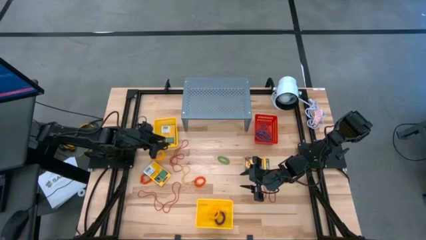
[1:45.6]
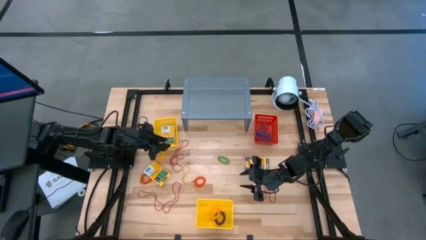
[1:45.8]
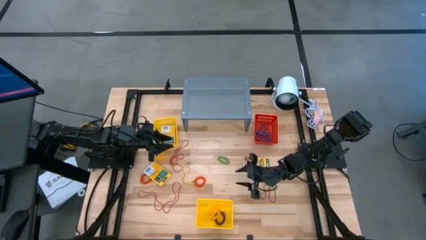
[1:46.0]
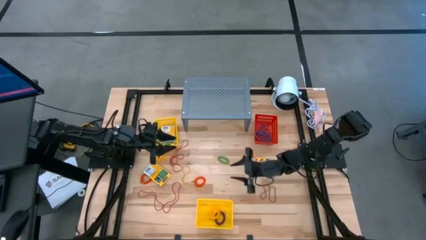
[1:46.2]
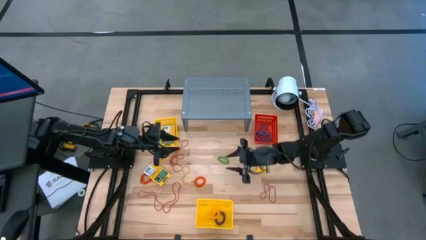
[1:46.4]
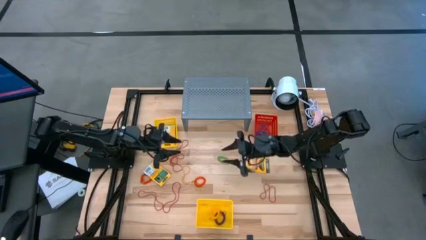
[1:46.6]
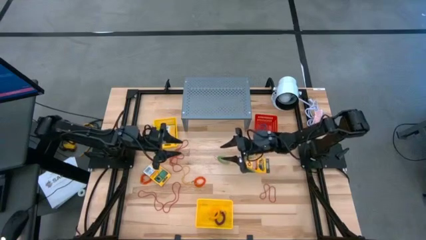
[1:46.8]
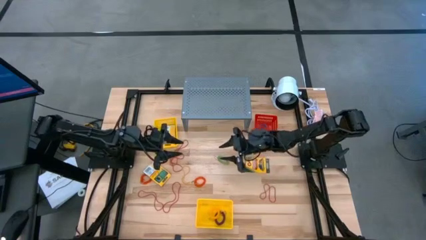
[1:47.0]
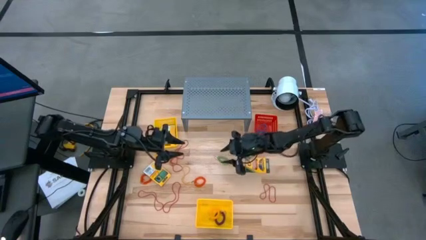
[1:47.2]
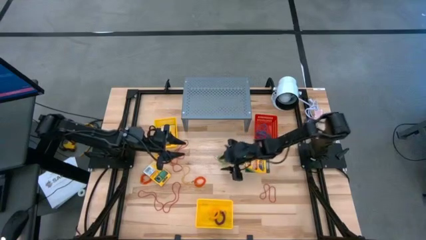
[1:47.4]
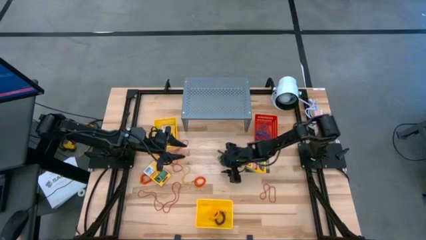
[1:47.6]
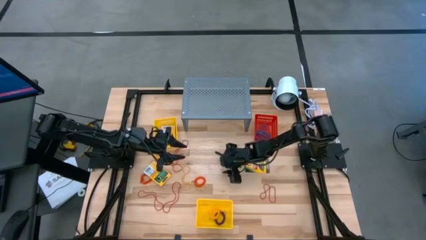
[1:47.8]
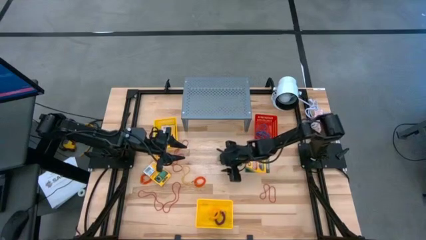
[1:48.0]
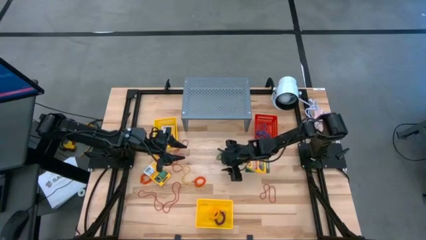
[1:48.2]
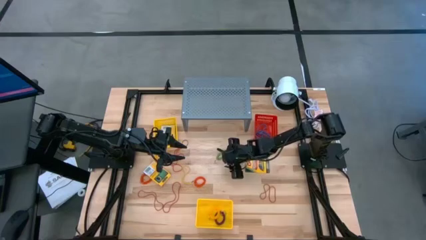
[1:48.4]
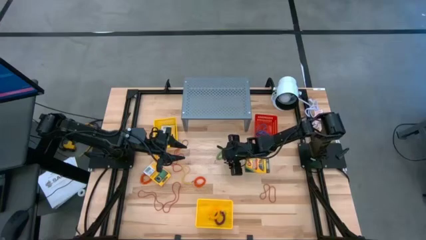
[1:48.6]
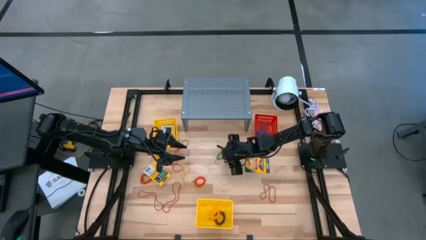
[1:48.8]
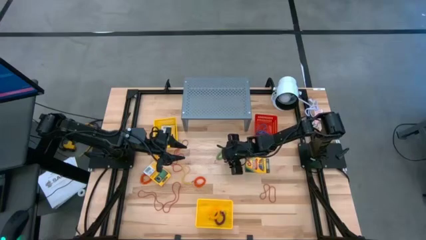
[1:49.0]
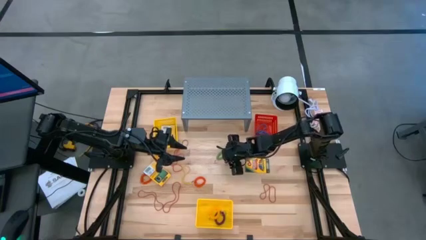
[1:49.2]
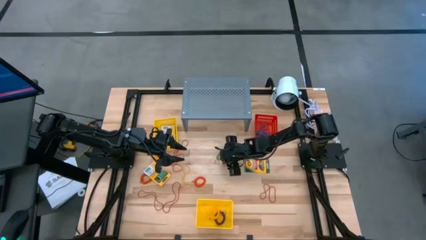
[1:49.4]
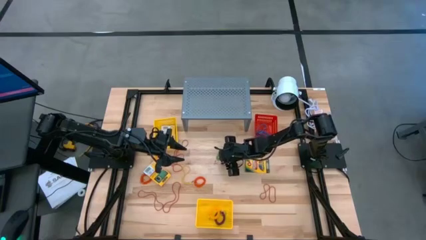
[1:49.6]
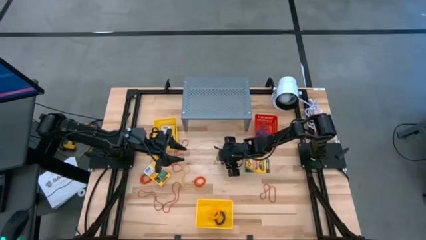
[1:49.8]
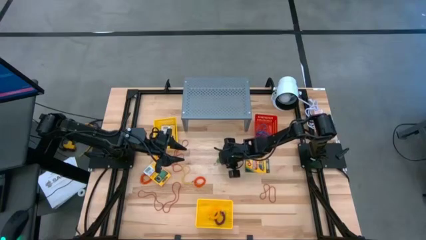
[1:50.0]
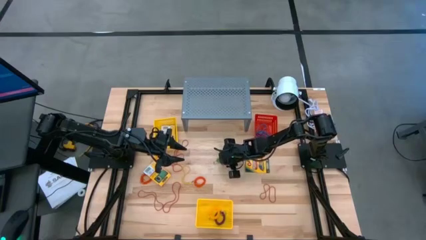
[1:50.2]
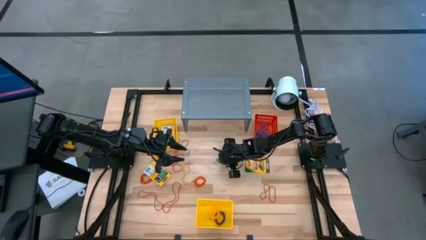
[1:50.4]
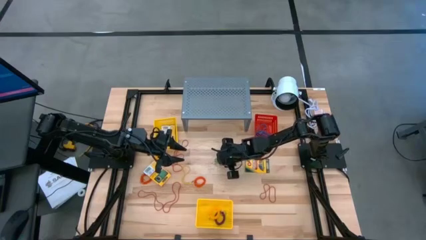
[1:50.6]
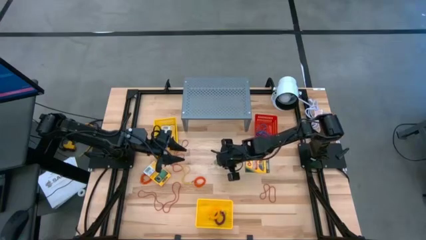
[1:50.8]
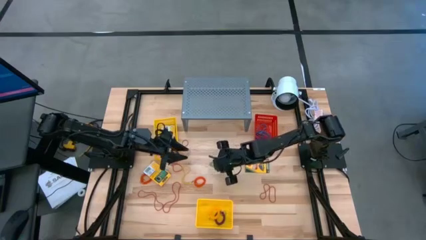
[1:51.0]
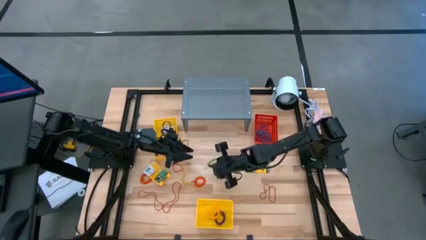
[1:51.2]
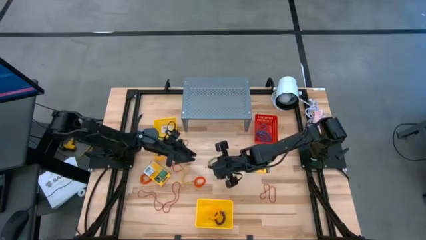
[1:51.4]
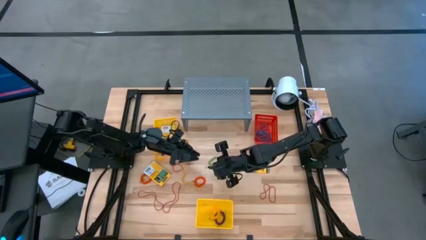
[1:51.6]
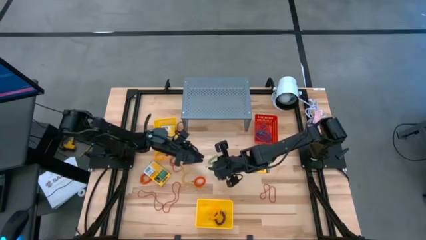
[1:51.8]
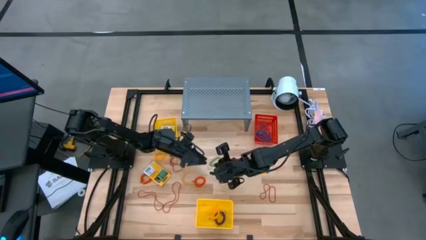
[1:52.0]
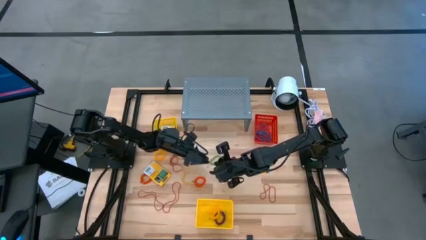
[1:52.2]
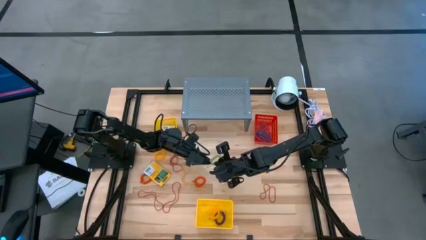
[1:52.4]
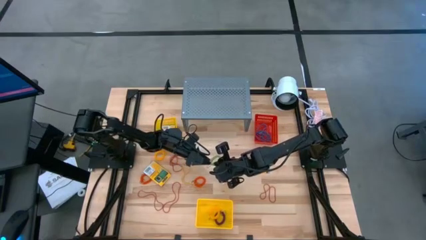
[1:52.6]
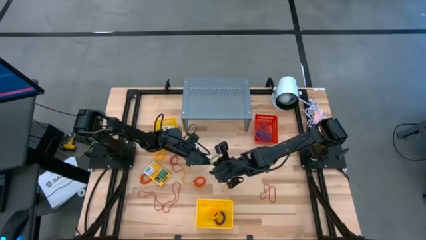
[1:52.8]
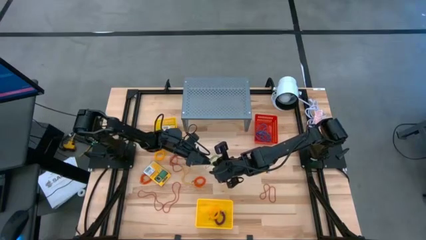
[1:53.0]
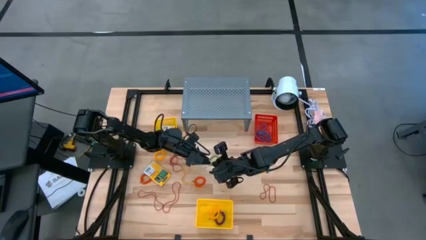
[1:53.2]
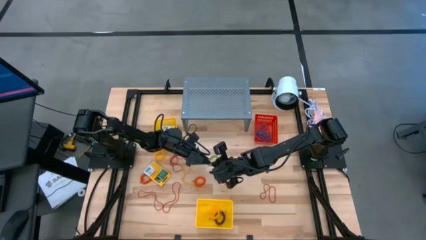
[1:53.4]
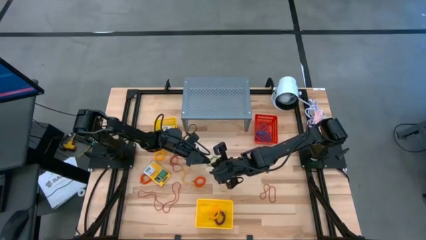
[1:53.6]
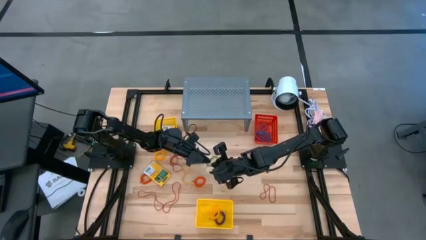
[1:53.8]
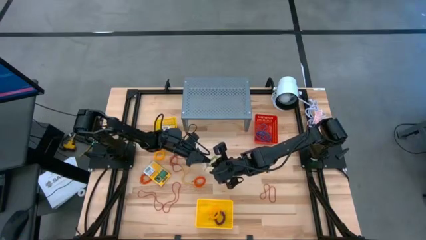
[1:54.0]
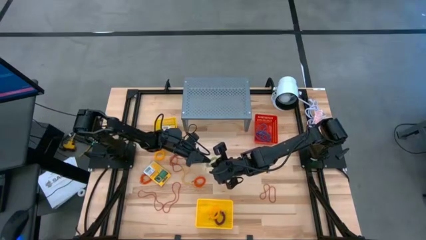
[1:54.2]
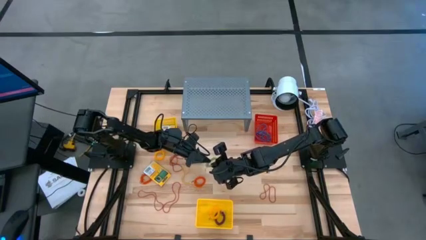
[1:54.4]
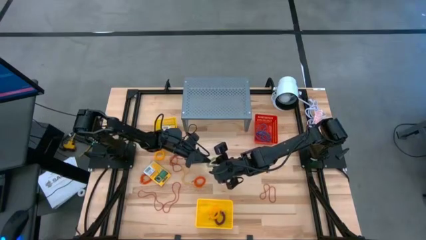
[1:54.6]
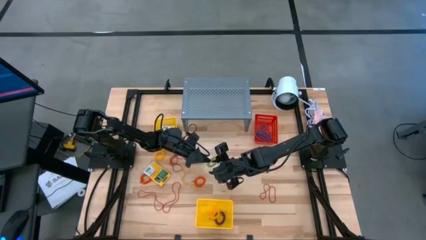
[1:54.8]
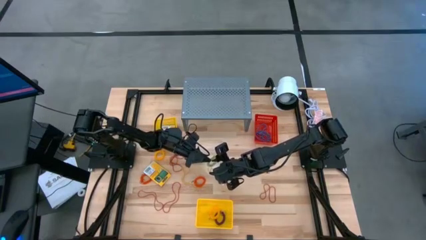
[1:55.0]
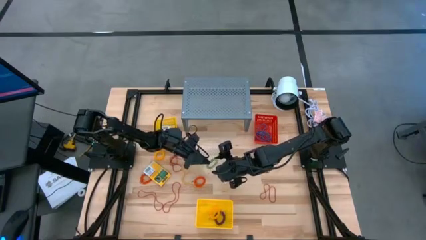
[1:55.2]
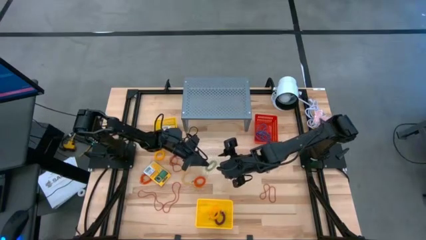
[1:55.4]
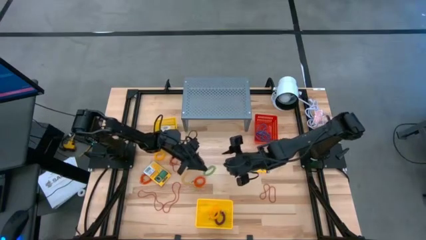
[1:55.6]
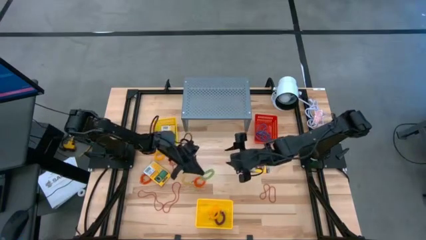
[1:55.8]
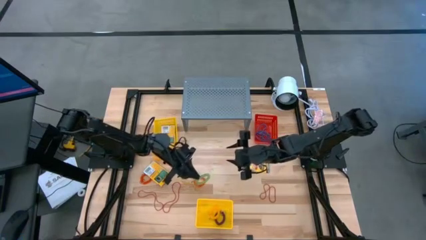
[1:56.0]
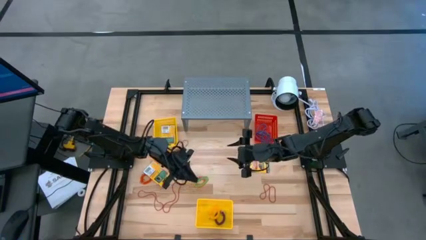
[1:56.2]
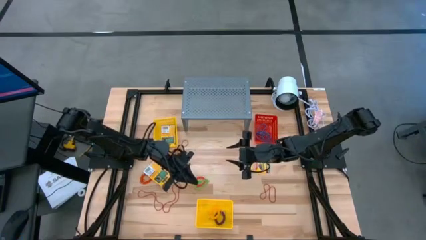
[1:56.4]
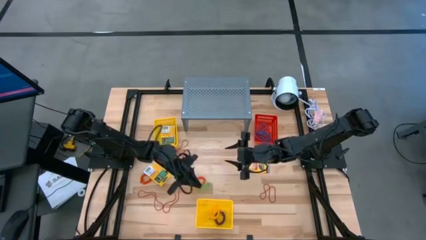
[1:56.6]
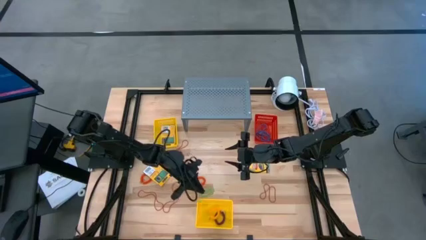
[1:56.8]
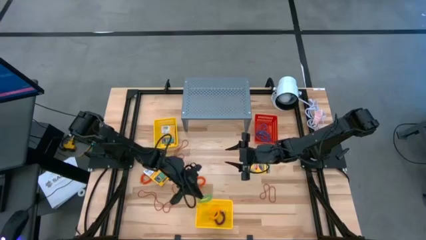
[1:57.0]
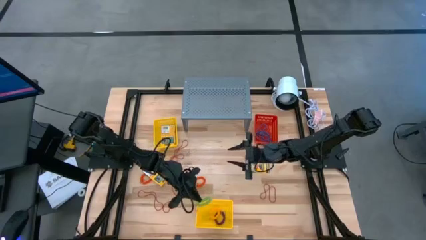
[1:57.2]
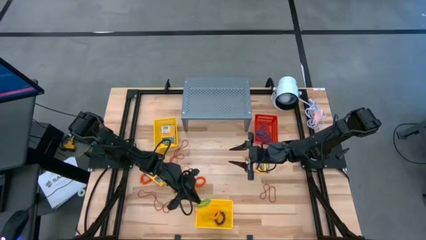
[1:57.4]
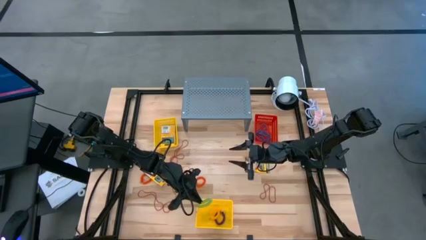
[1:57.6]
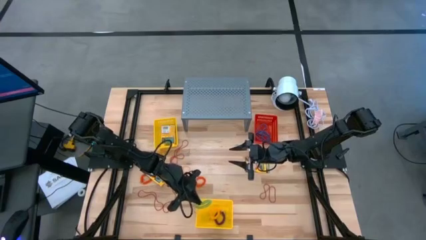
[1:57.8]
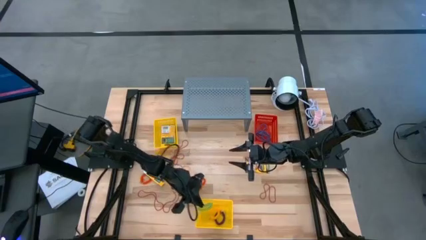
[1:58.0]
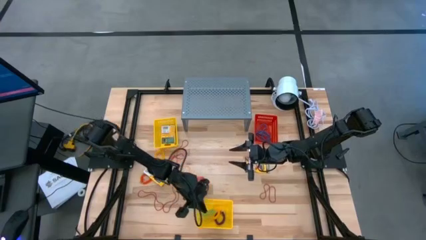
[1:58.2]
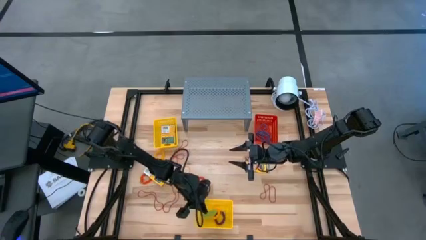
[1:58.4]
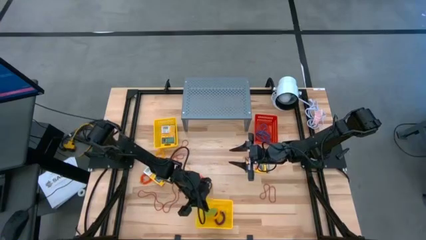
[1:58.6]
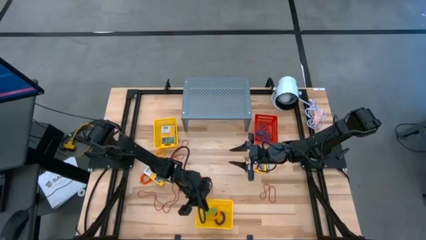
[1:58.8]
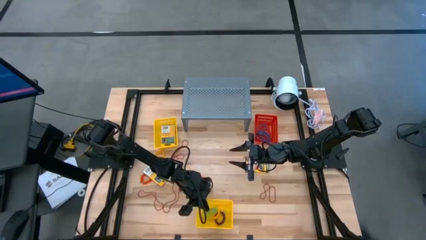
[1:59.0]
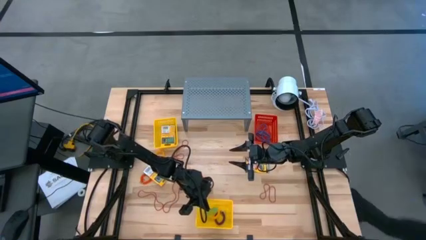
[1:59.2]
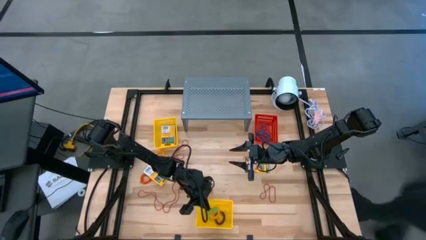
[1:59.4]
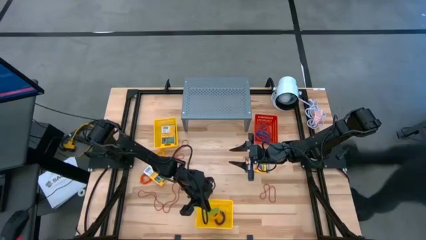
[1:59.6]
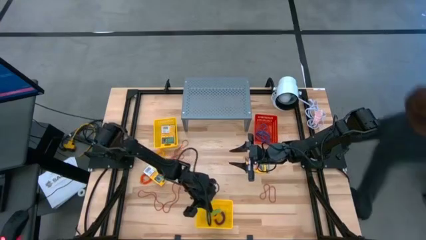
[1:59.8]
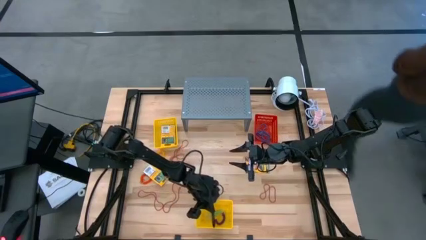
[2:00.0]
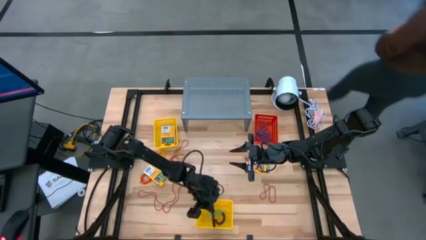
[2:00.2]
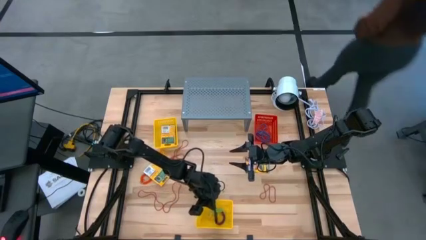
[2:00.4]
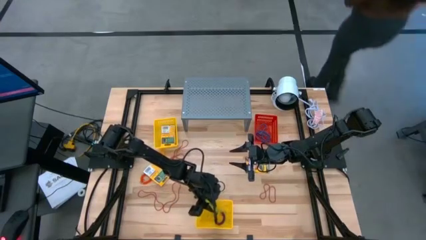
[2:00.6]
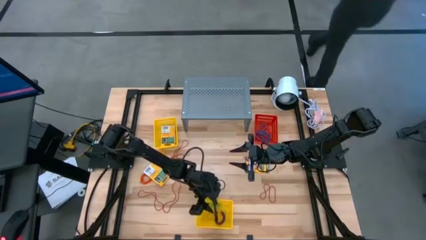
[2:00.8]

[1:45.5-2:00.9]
Task: Pick & Place Office Desk Supplies
Put the green spiral keychain into the bottom yellow bin
